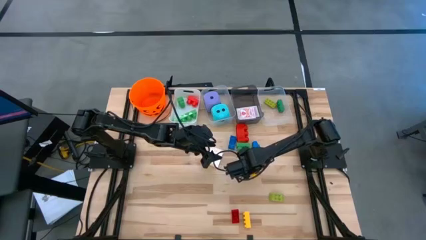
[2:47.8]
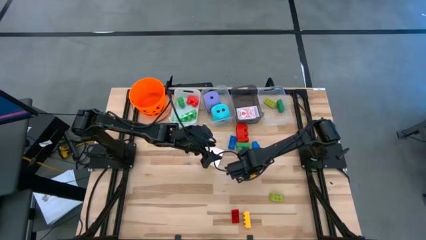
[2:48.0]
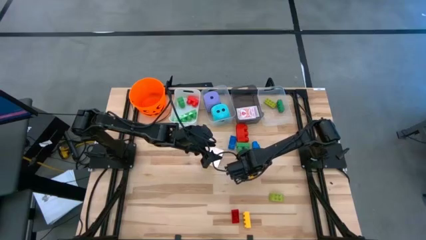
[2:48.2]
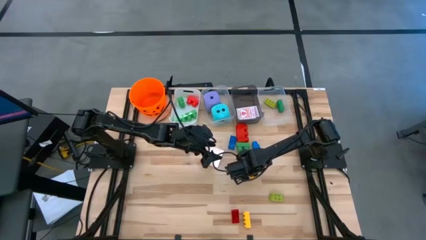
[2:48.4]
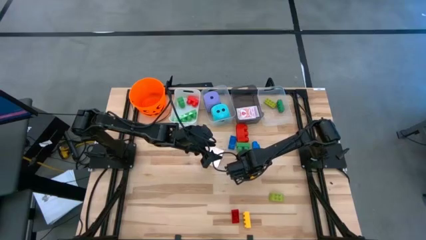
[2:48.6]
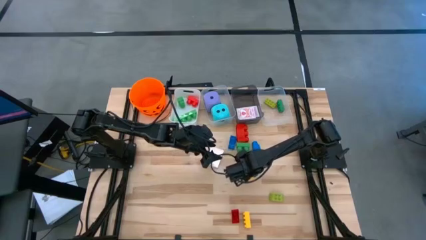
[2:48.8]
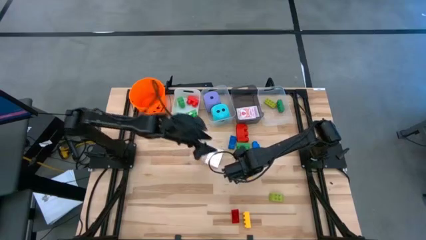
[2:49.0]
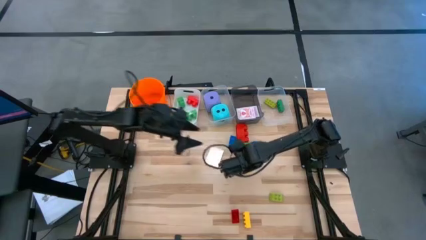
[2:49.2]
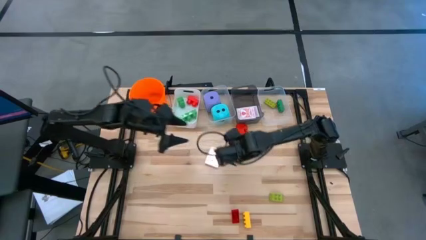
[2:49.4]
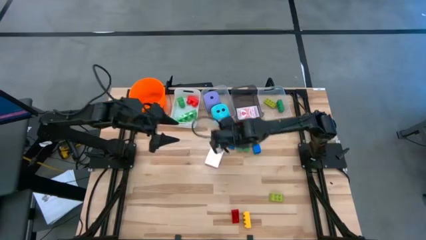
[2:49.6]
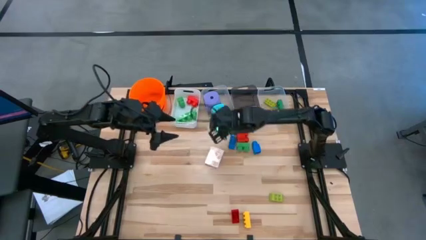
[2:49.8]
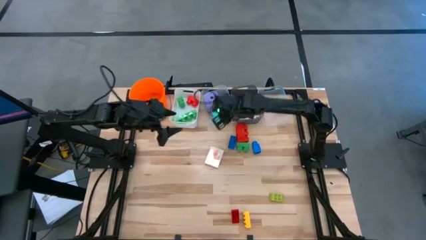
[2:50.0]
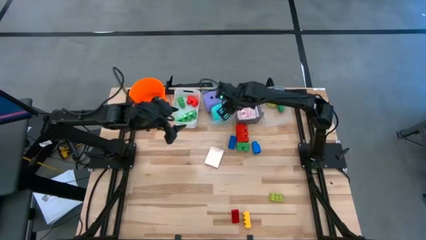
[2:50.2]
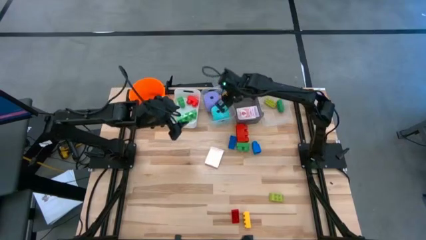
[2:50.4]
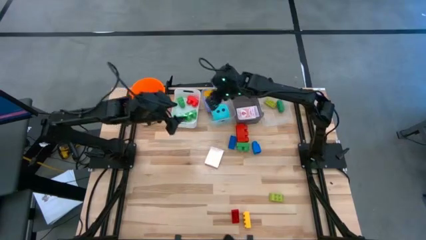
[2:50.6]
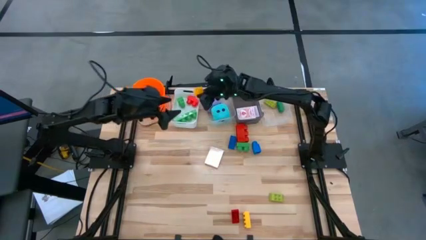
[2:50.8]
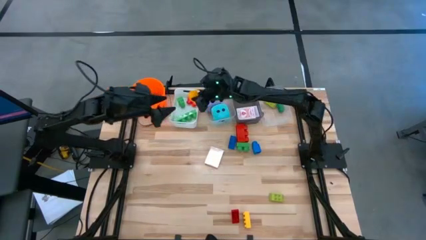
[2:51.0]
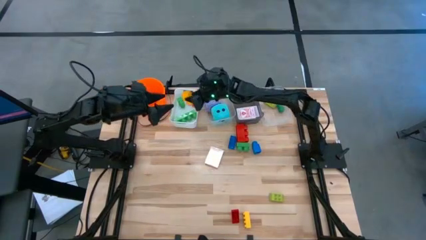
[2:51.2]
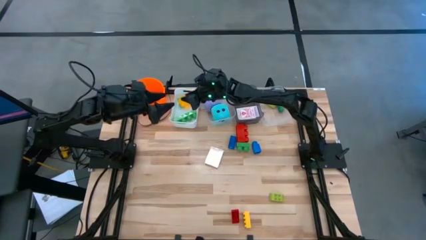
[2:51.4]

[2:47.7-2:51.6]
Task: Pick & Place Toys
Put the 1 stud yellow game piece into the white bin

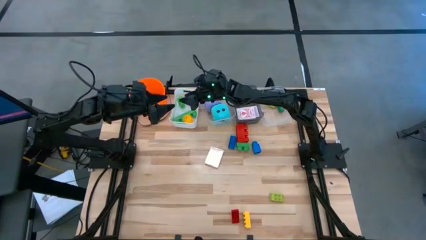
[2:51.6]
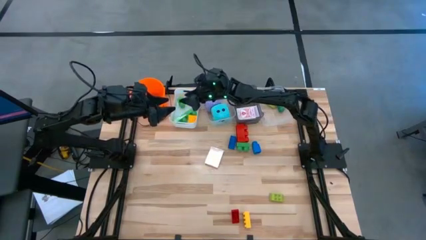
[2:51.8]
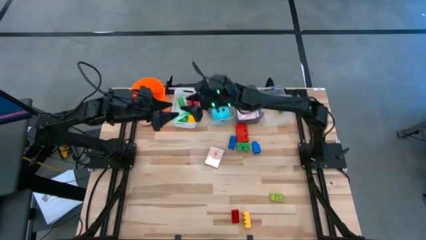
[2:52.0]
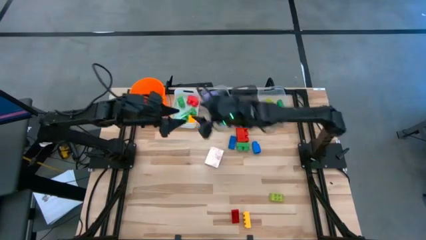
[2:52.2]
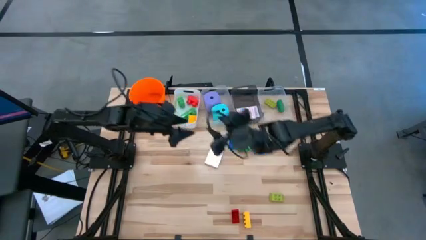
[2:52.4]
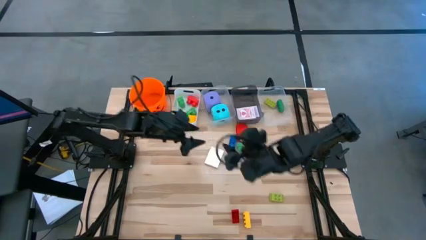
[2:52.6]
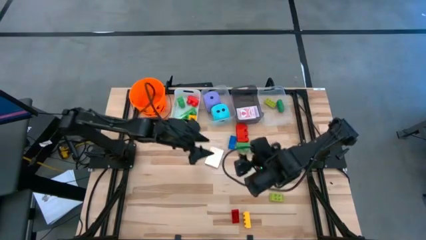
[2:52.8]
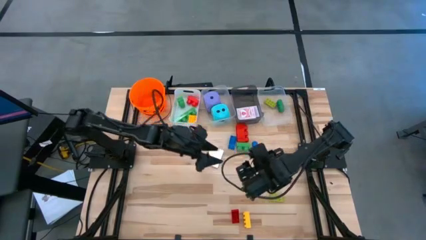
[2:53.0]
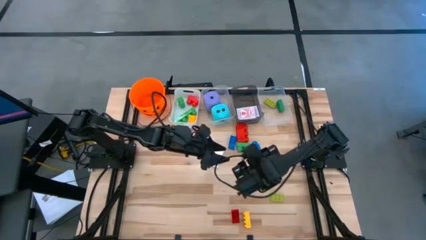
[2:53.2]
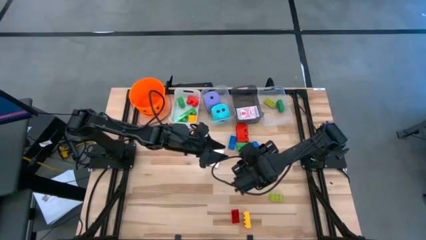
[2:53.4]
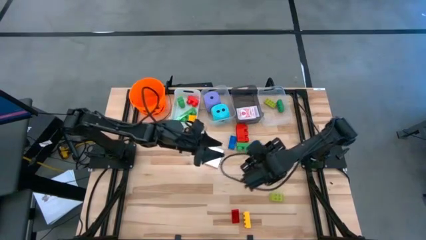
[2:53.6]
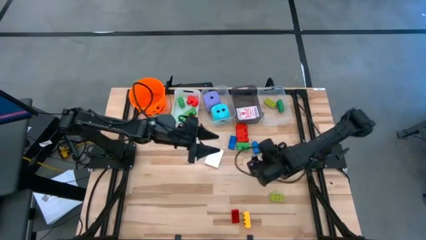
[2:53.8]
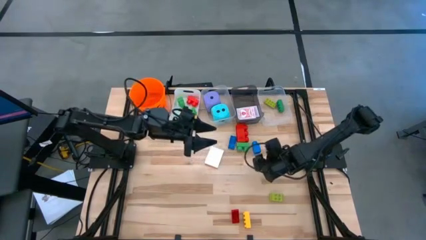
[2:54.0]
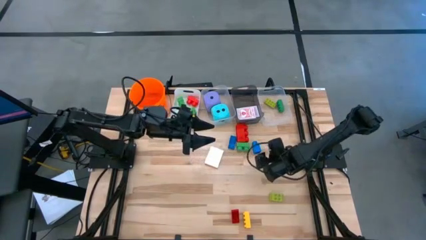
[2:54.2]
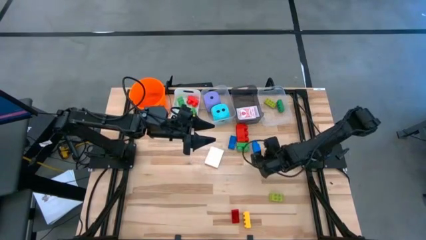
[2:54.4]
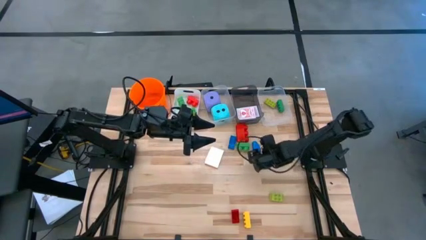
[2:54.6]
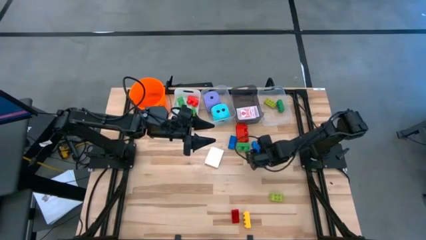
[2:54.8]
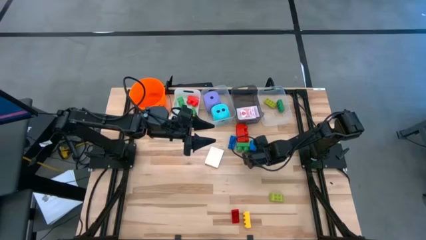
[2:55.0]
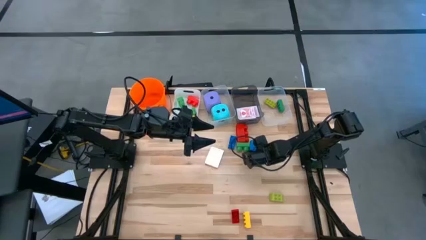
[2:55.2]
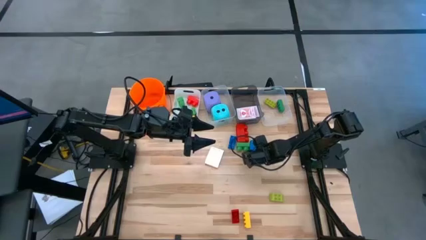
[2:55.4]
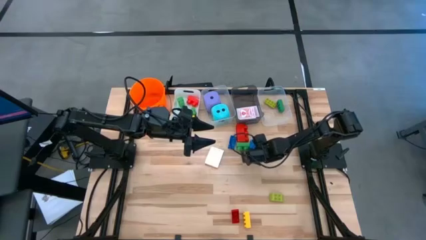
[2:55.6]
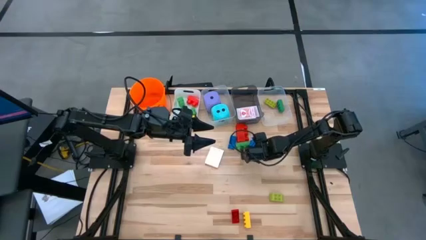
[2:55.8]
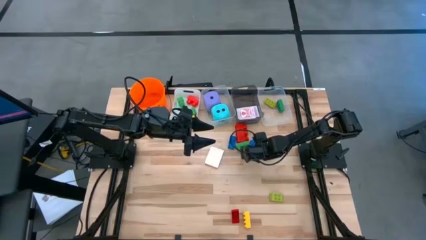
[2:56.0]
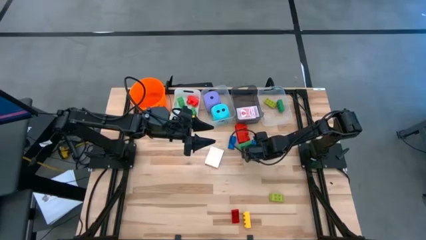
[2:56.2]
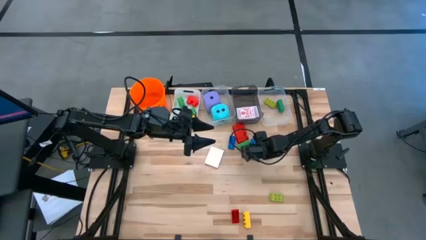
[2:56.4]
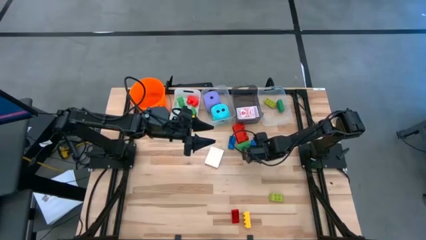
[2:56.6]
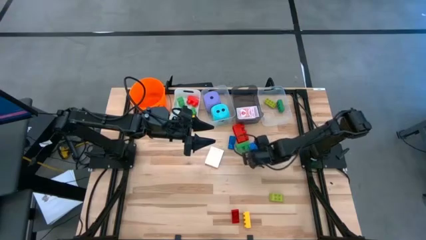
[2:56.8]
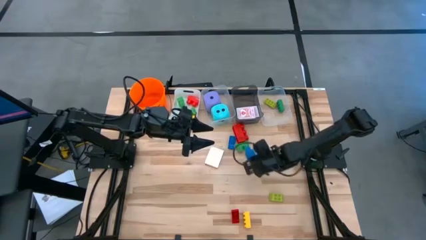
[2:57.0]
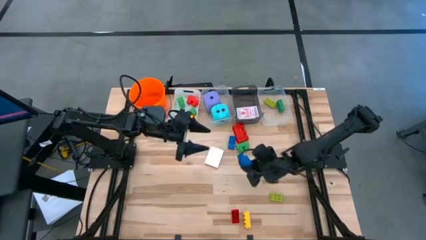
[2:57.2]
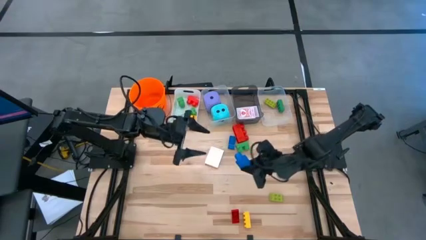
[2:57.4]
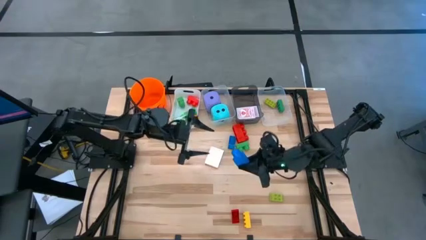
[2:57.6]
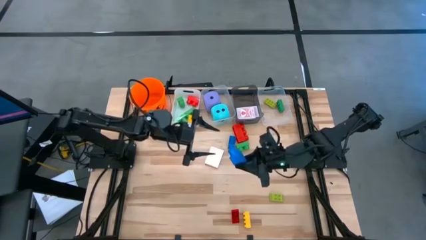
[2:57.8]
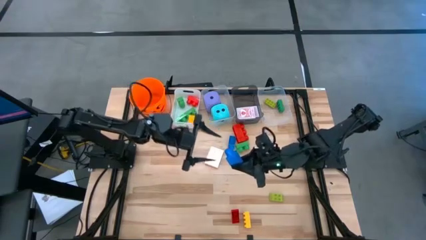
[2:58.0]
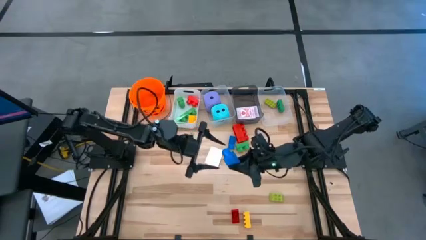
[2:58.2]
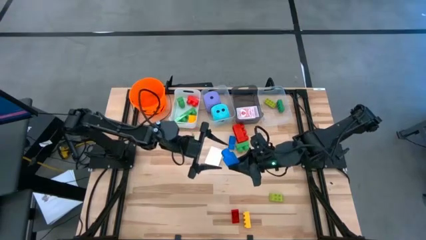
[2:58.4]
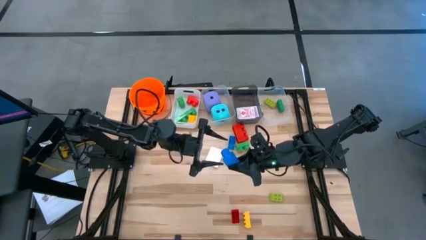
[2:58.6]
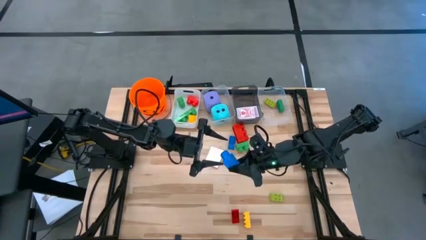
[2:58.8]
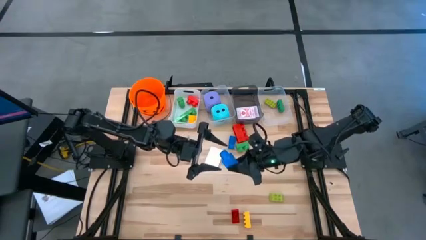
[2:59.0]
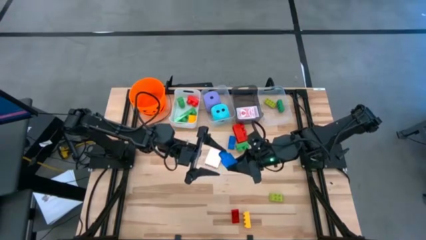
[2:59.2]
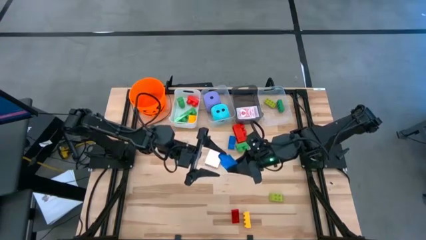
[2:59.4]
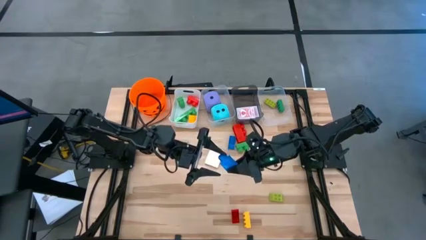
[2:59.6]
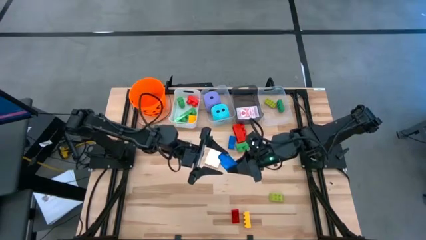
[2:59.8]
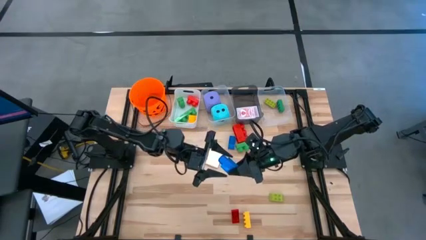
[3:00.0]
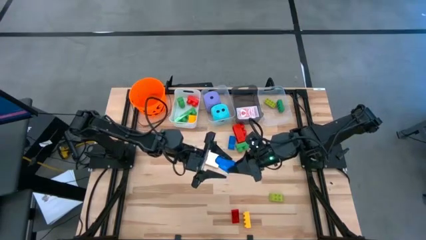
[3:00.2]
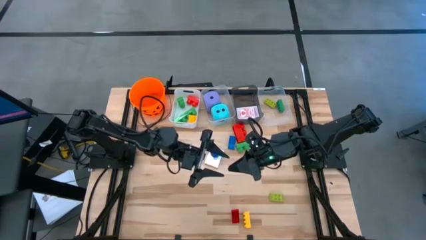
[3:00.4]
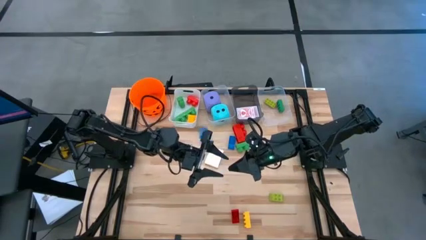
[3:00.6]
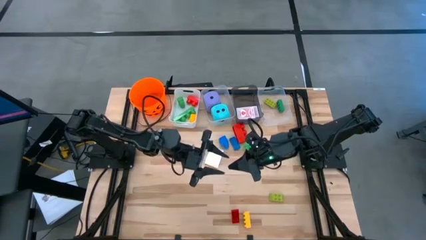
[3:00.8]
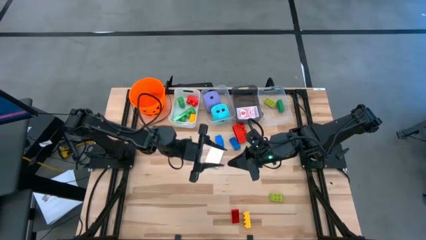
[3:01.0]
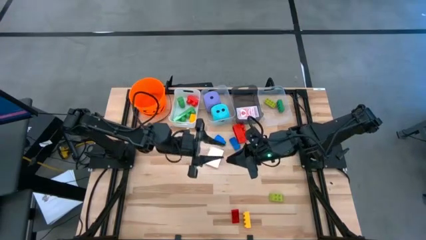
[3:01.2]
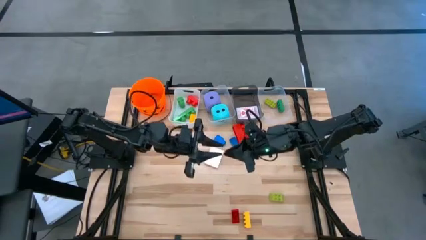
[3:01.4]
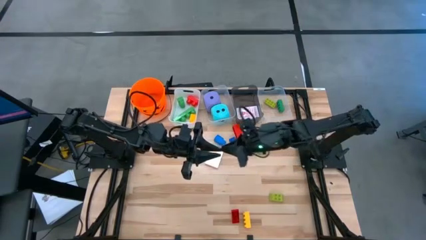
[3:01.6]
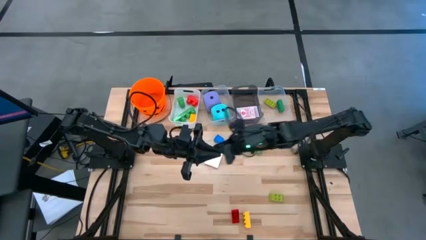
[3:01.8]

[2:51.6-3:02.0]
Put the 1 stud blue game piece into the white bin

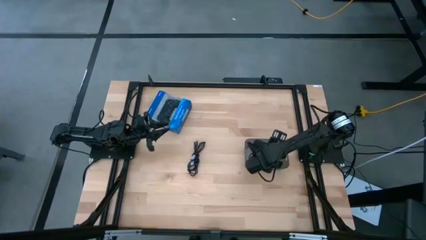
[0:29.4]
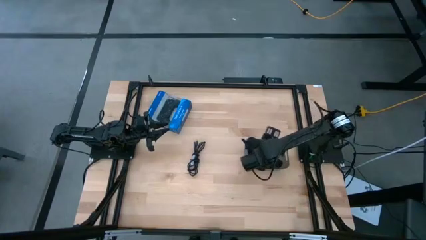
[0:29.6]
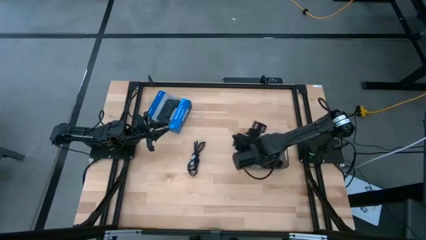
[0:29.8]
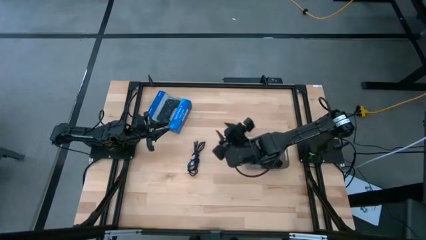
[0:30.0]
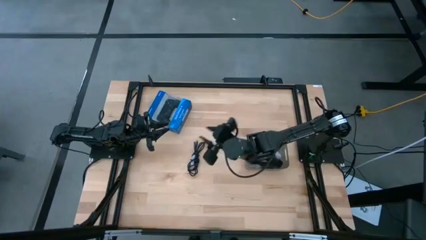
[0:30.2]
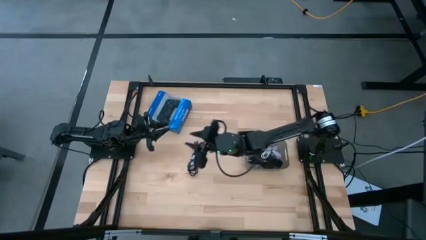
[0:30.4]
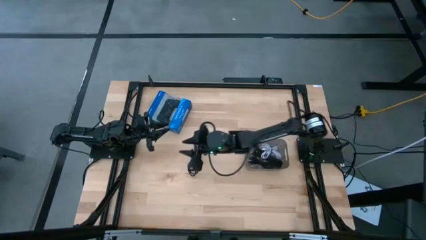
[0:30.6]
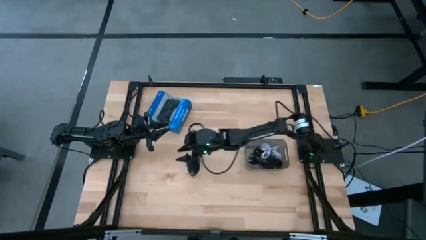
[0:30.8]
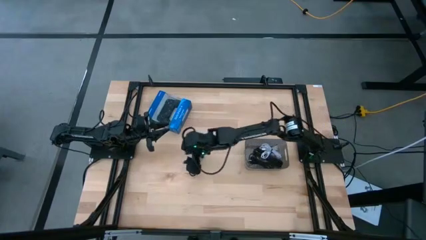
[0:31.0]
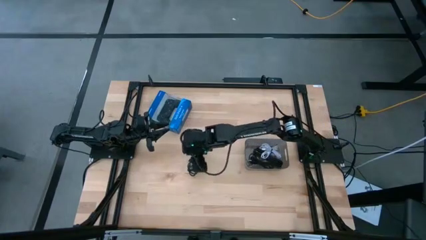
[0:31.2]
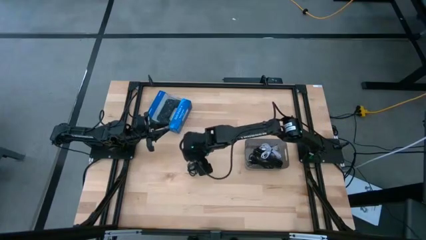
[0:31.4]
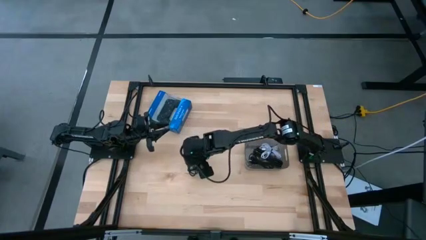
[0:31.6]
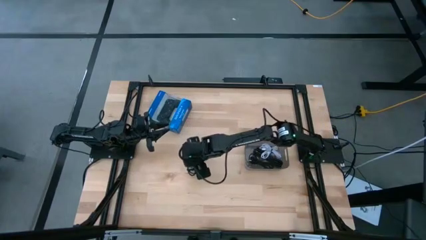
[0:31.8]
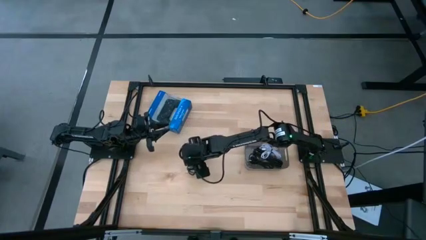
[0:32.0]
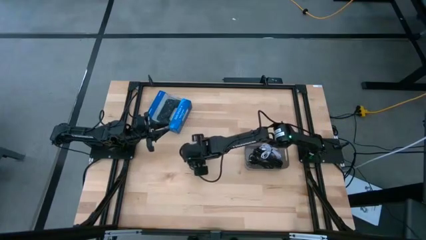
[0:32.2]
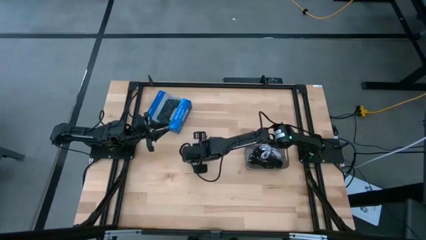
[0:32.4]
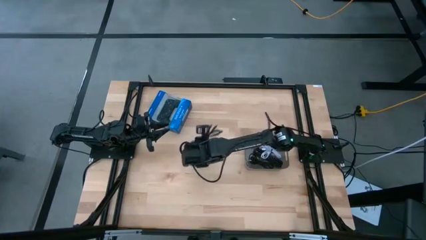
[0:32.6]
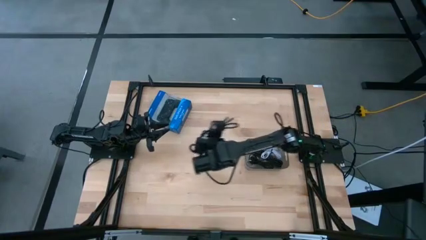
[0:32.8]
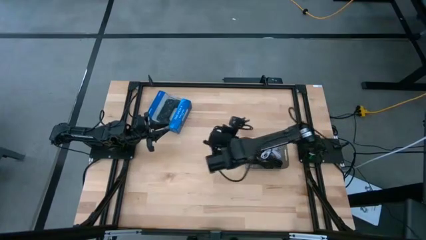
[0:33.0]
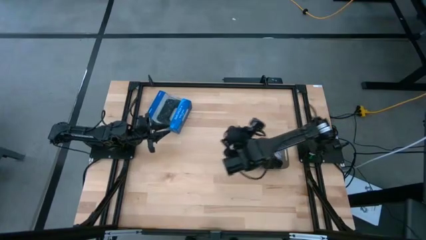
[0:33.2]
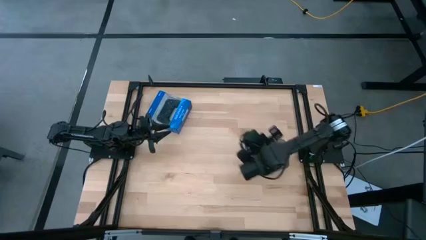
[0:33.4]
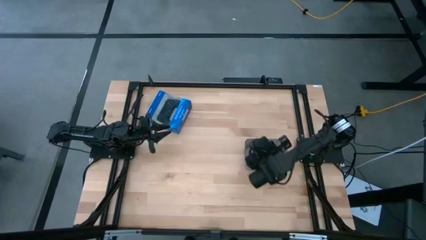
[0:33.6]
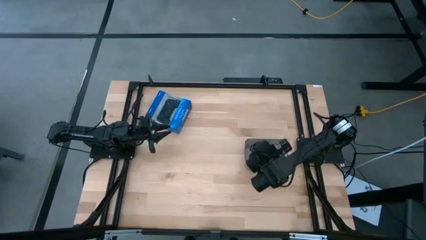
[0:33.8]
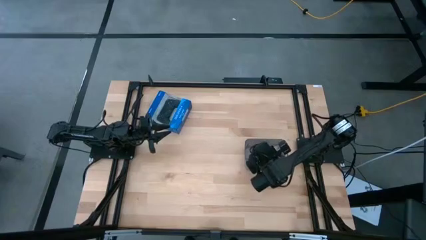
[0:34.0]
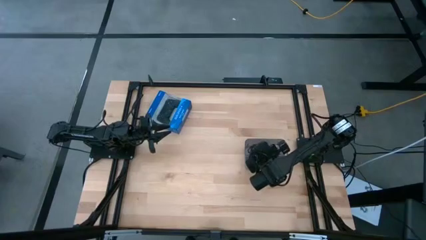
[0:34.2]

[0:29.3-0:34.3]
Task: Pick and place USB-C Cables
Put the black charger cable into the black bin
